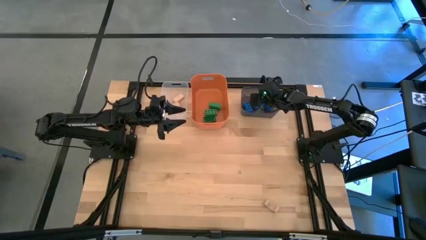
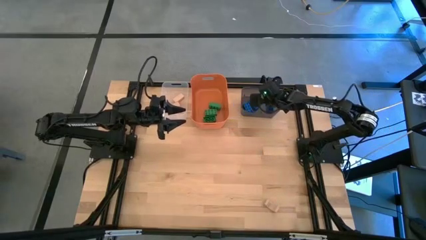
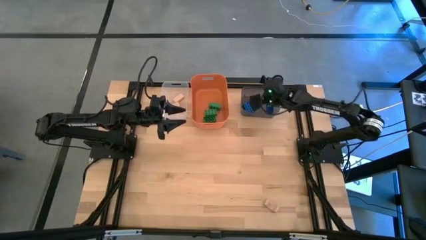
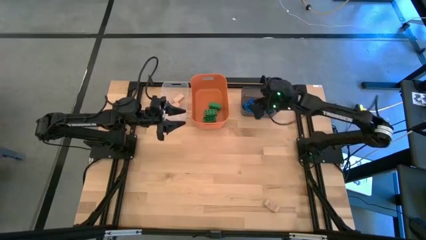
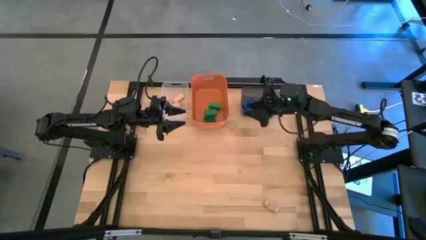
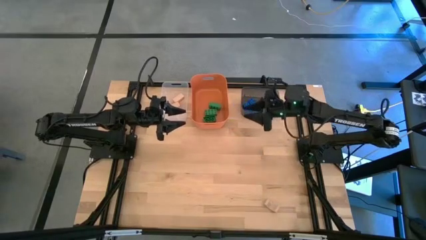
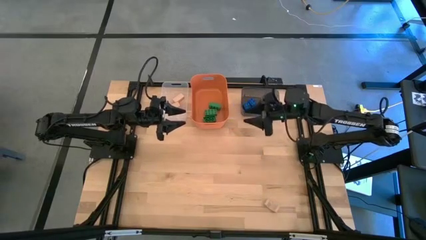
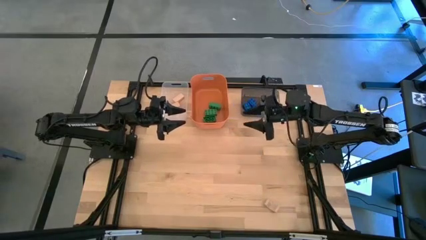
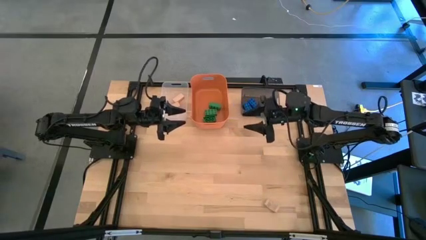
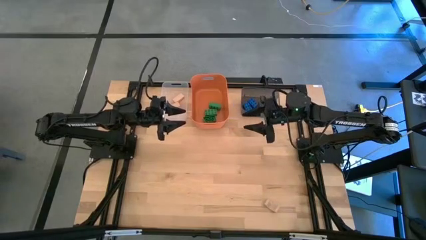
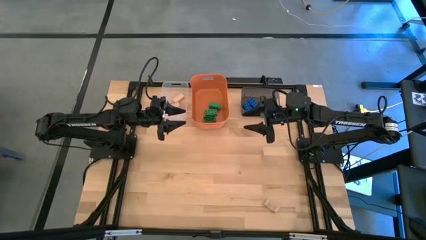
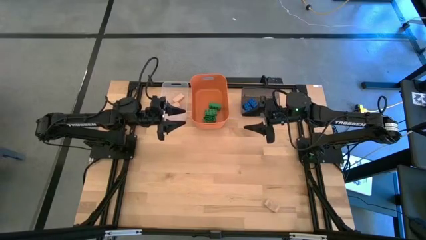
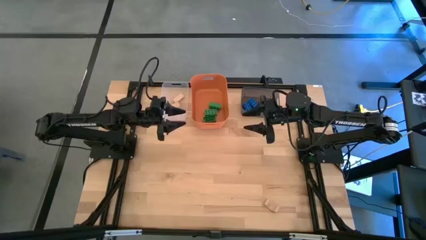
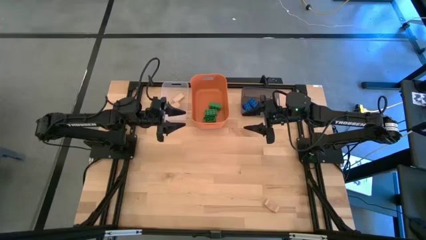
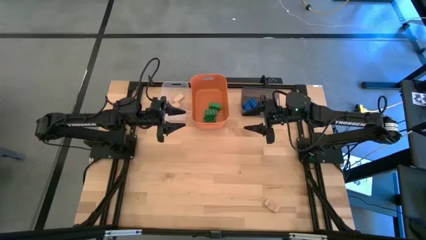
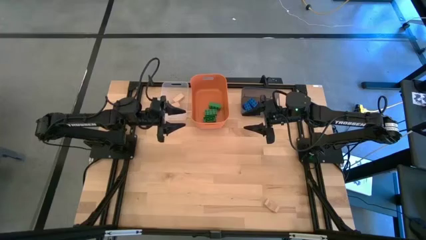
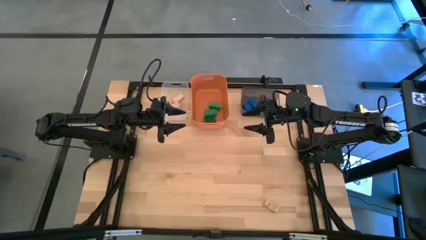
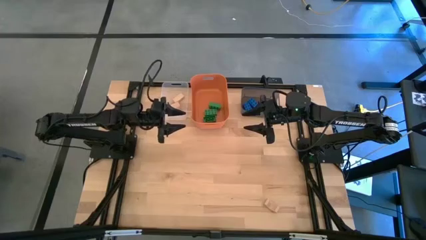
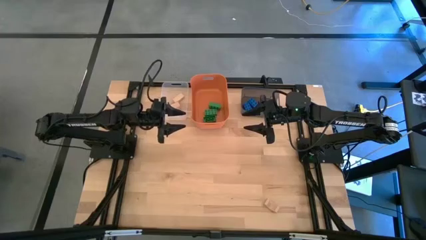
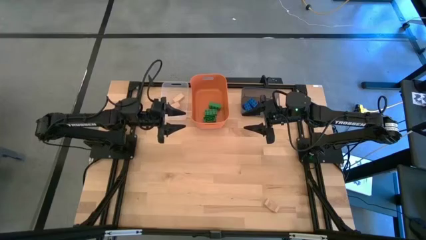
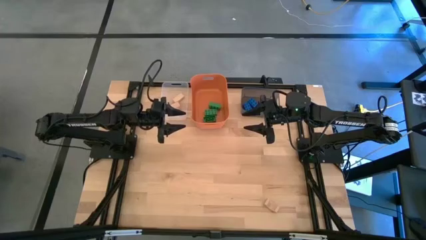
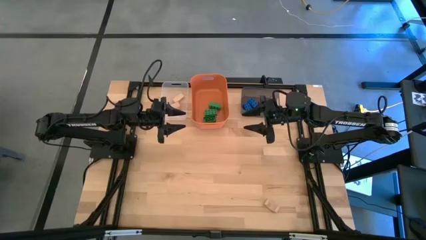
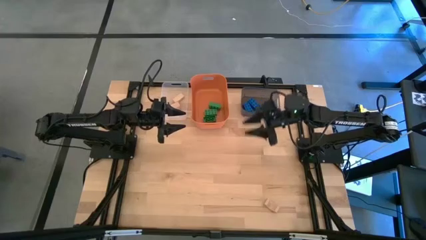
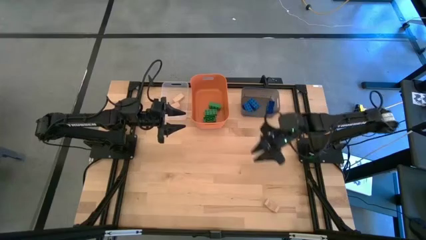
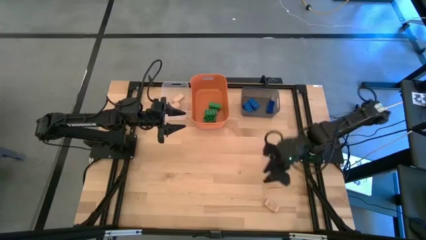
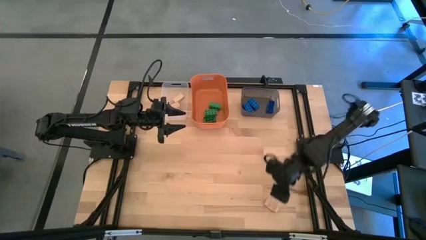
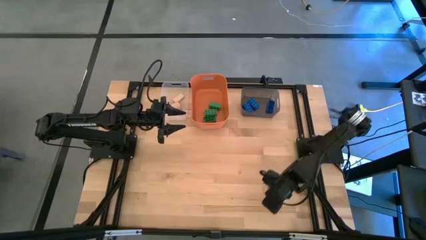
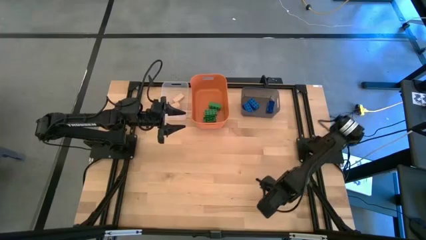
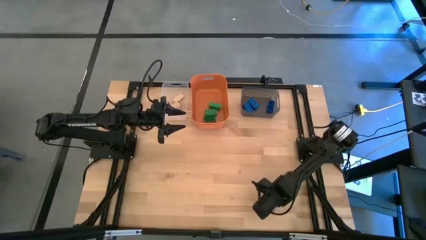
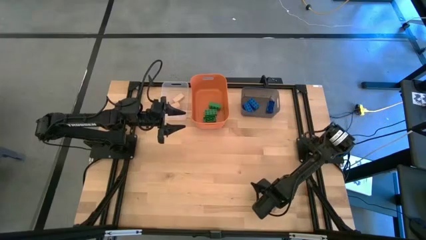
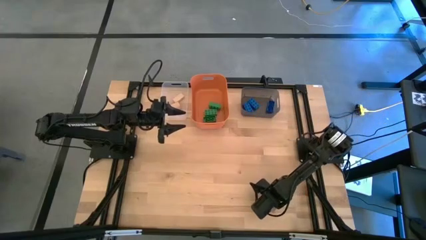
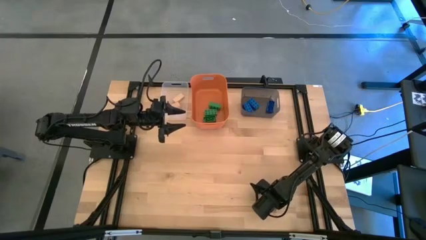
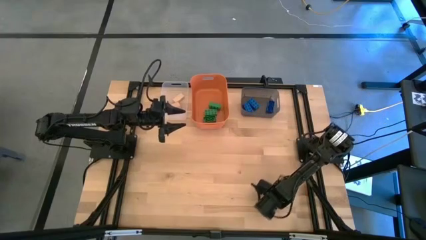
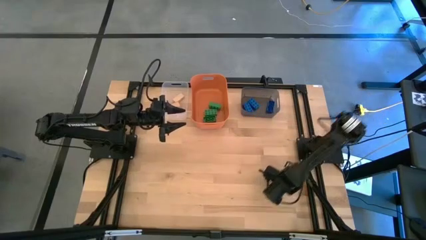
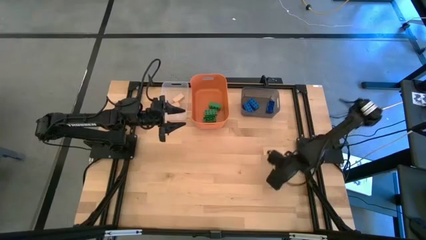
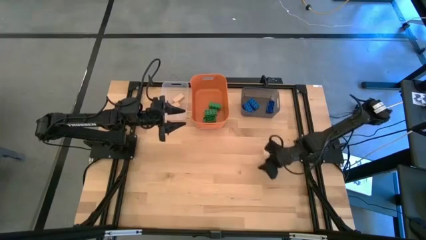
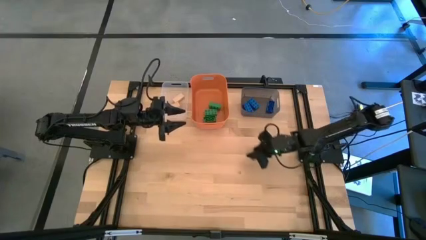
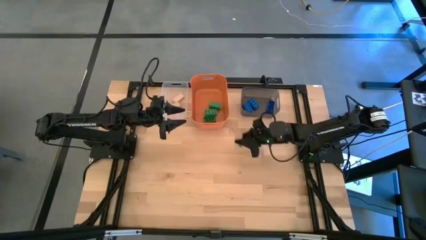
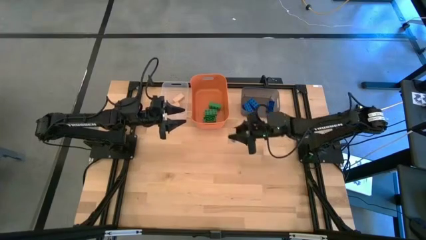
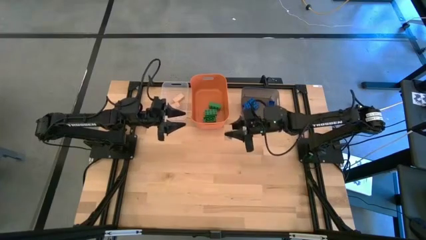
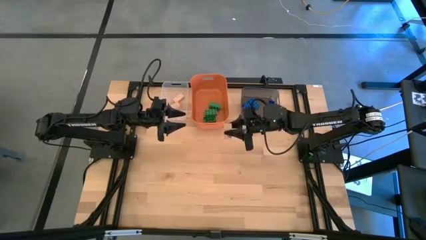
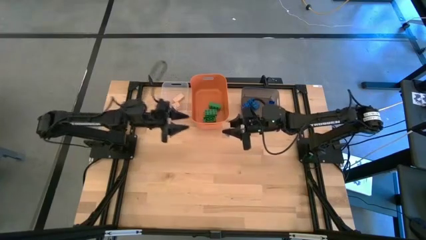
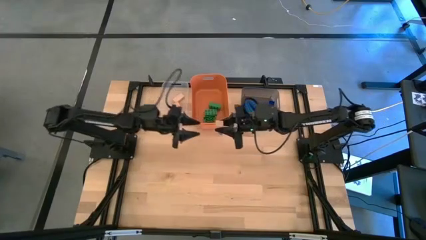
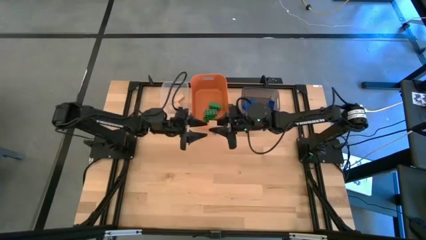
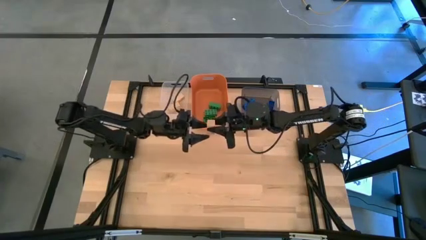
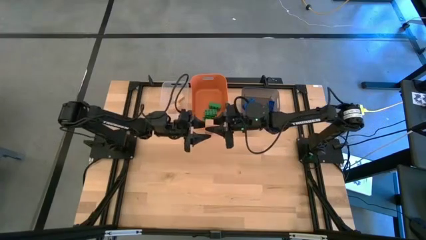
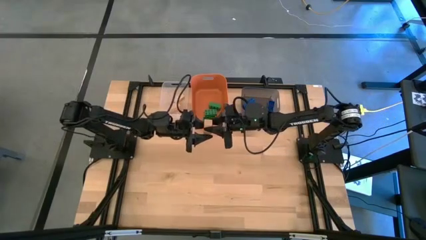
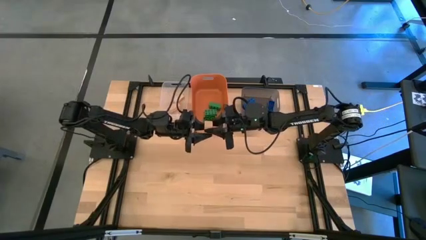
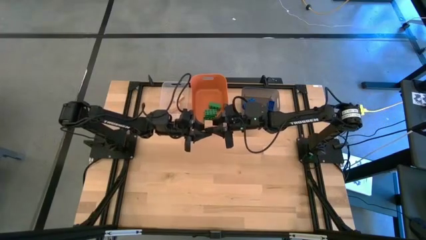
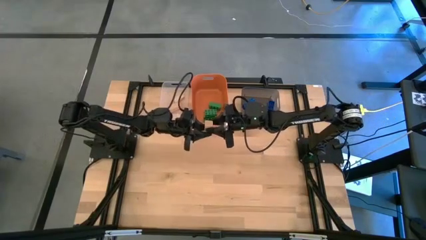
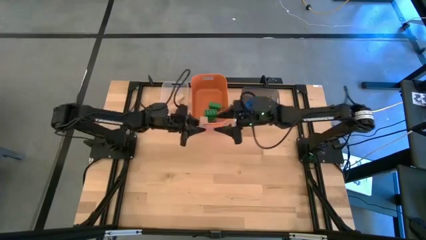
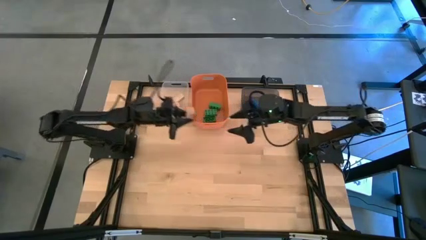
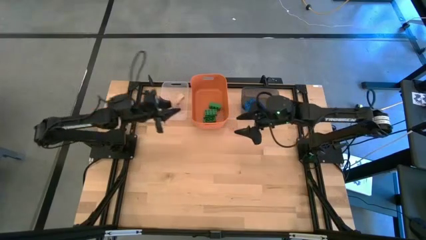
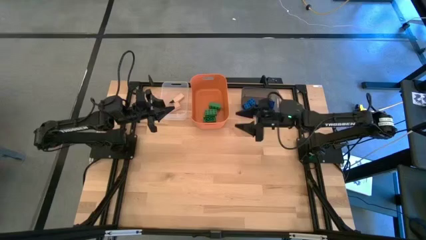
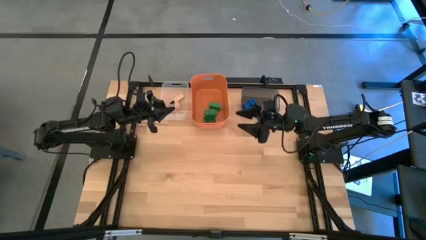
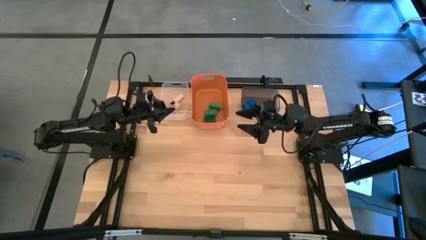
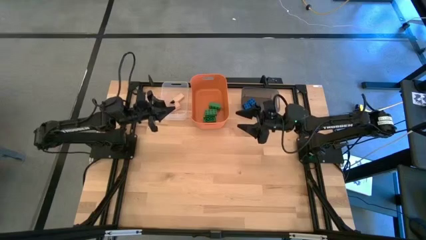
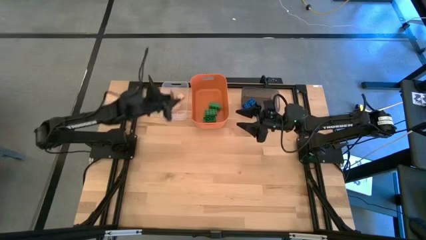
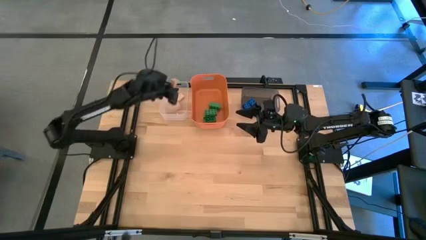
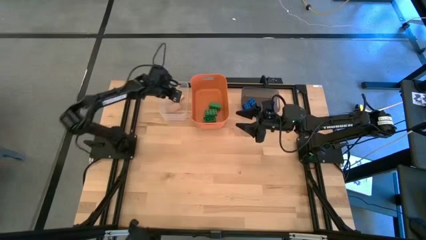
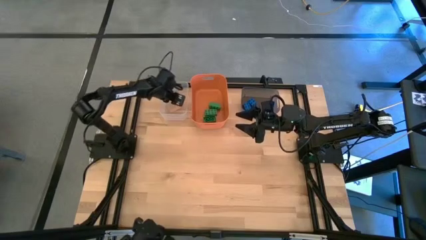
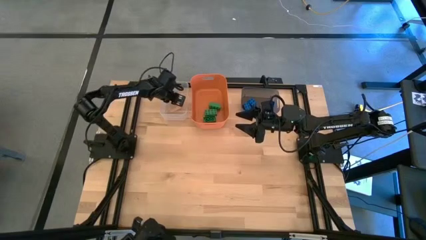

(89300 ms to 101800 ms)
Task: Sort & place blocks by color
Put the brown block into the transparent bin

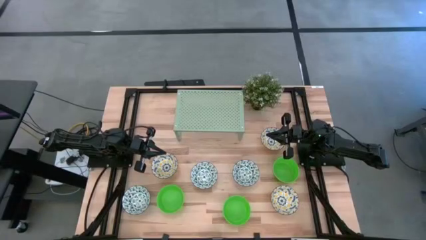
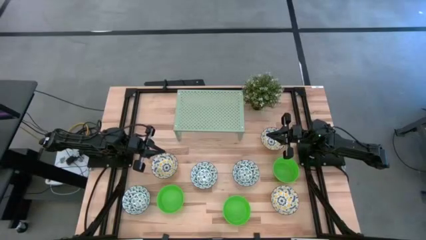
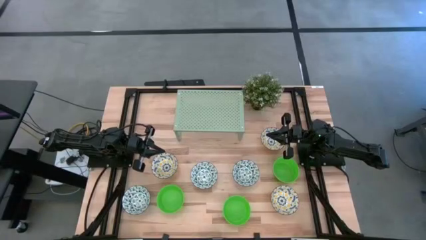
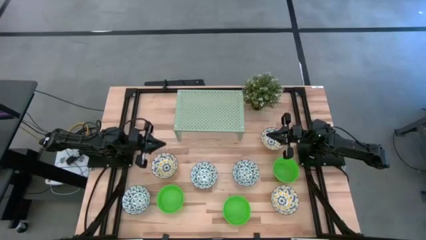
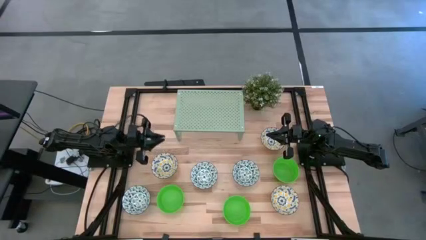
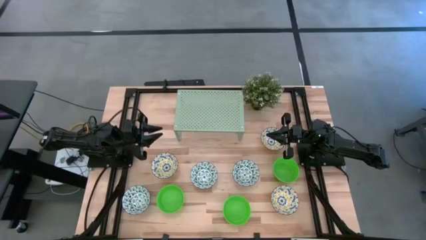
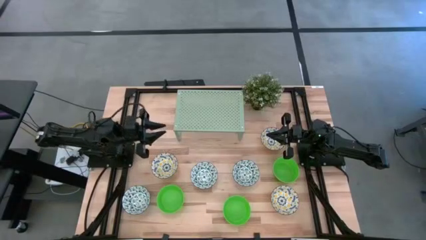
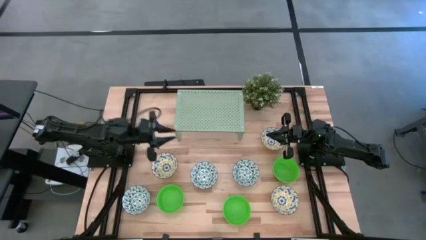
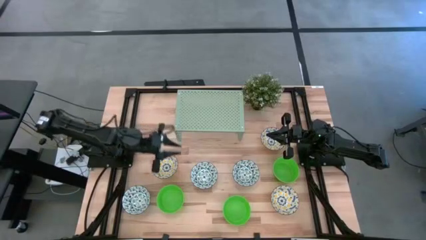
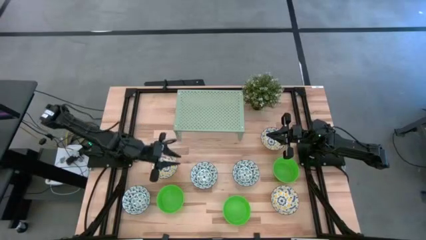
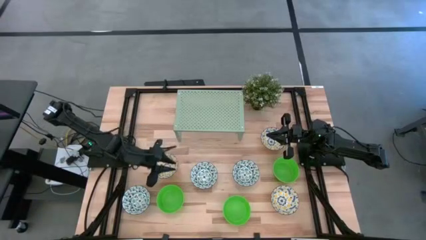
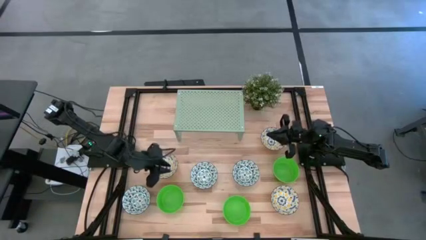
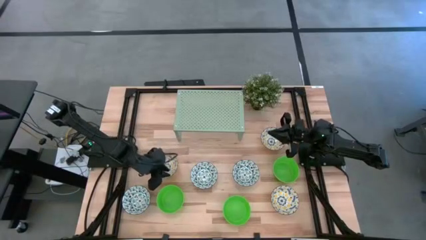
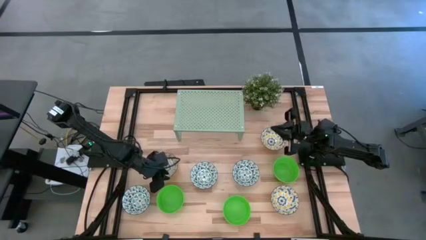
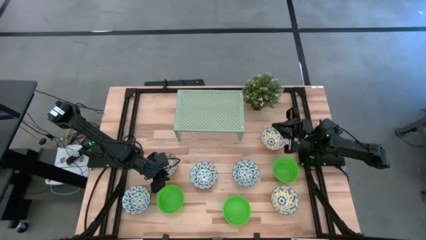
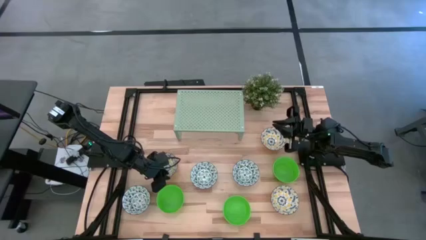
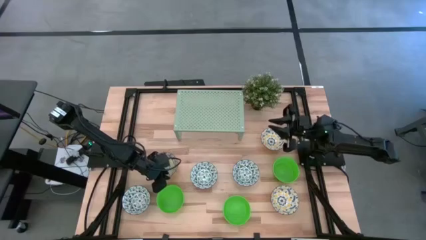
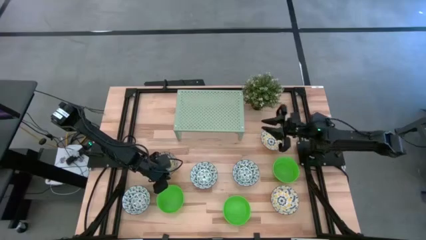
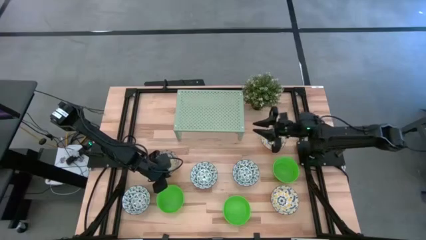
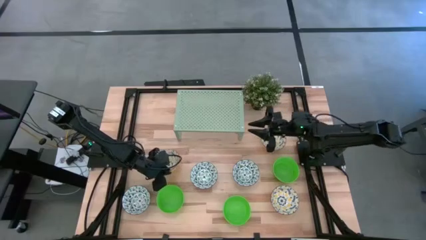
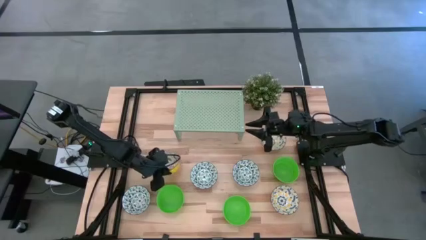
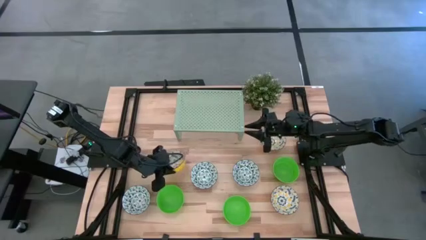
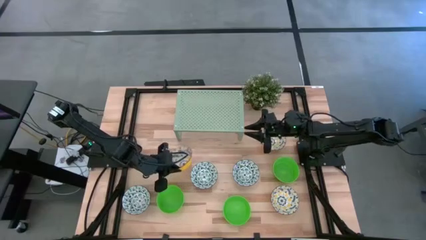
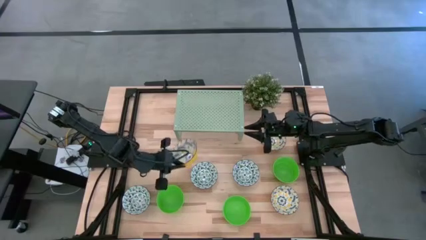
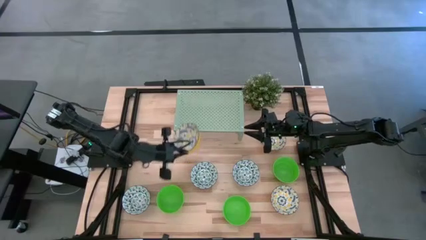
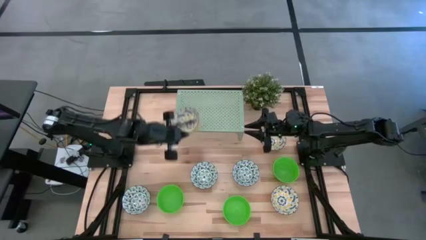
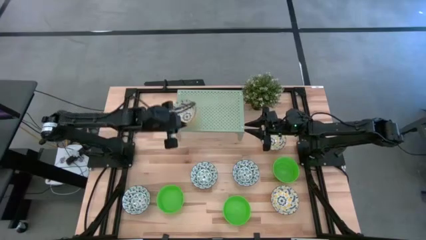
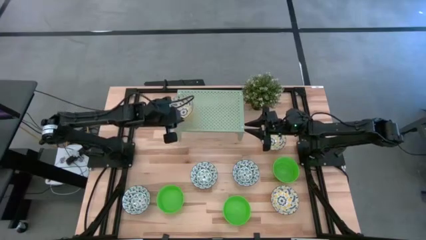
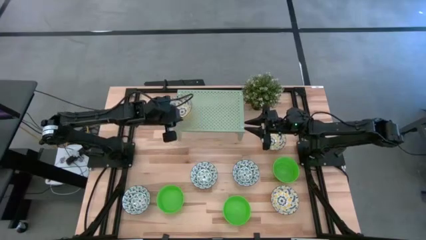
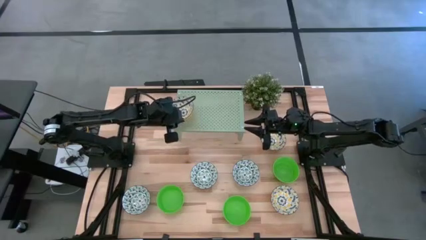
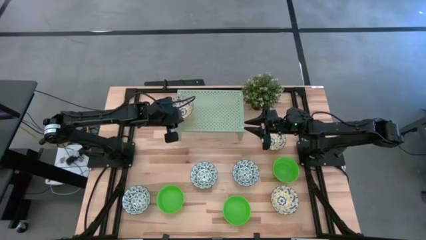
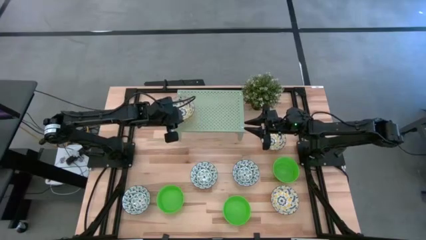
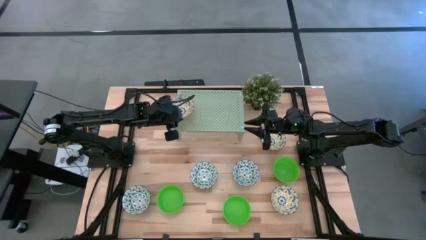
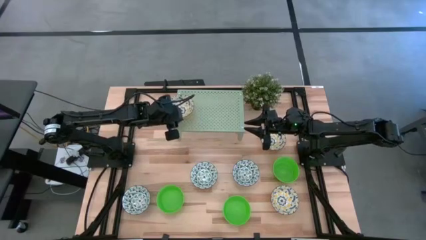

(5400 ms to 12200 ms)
Task: Pick & Place Mini bowls
Put the left yellow and white bowl on the shelf
